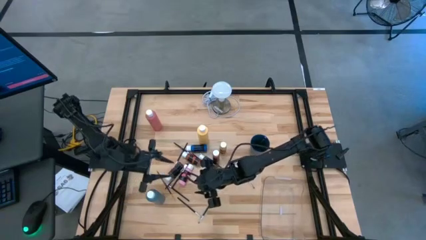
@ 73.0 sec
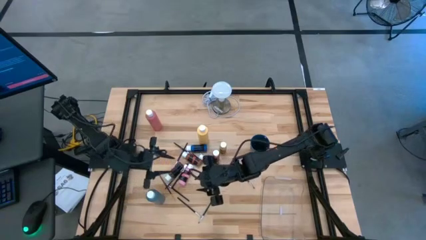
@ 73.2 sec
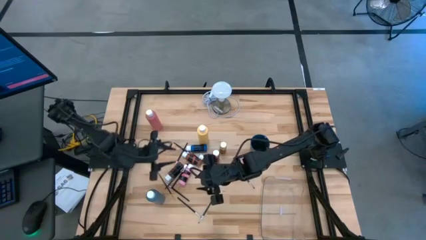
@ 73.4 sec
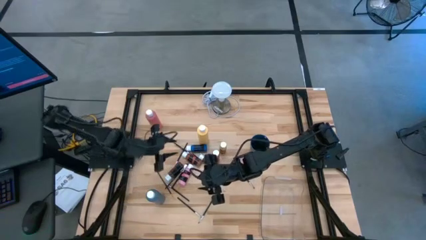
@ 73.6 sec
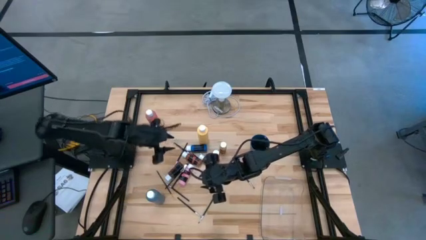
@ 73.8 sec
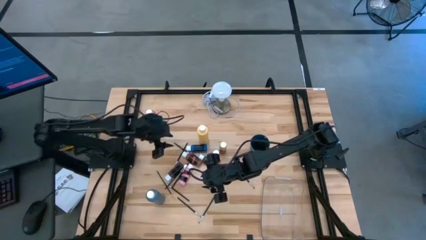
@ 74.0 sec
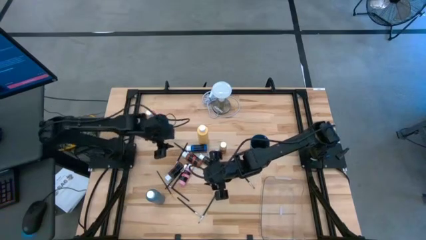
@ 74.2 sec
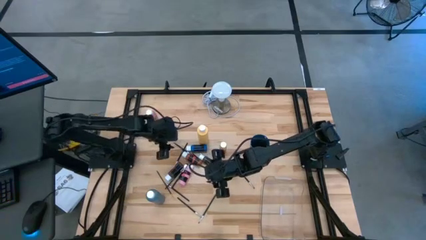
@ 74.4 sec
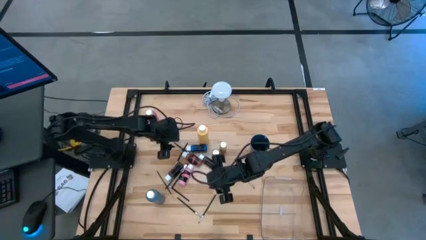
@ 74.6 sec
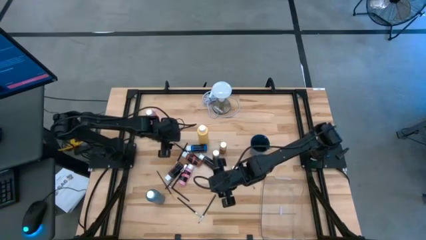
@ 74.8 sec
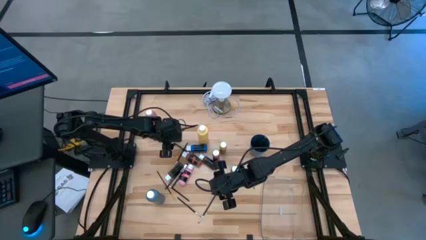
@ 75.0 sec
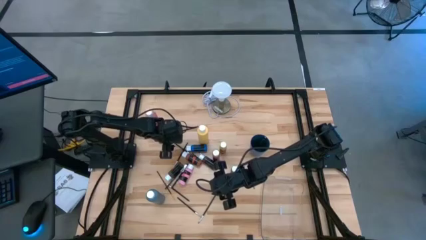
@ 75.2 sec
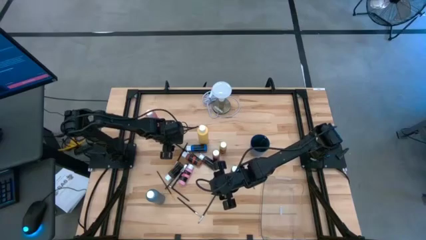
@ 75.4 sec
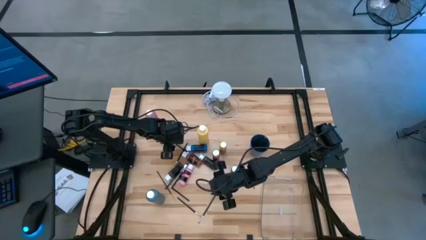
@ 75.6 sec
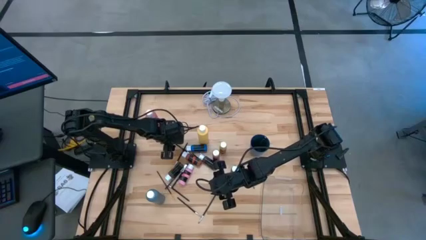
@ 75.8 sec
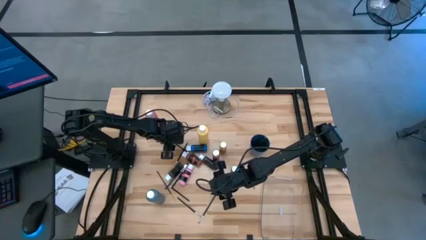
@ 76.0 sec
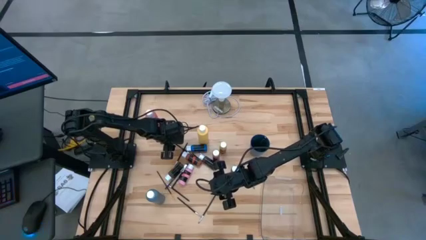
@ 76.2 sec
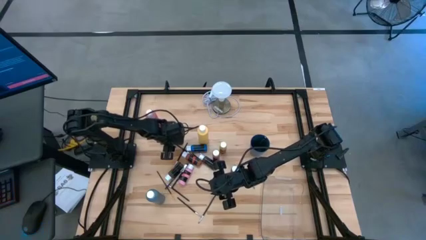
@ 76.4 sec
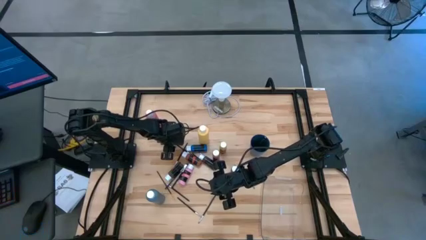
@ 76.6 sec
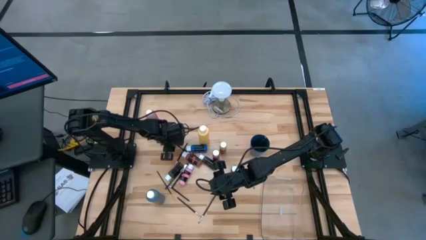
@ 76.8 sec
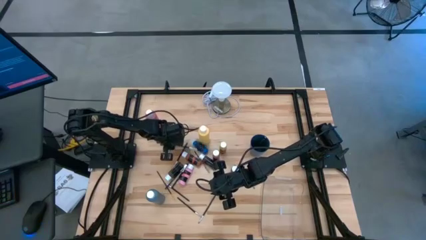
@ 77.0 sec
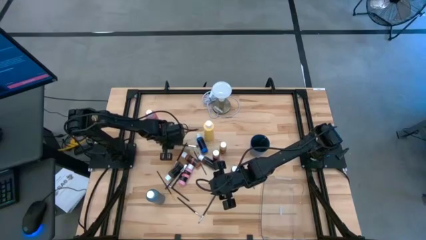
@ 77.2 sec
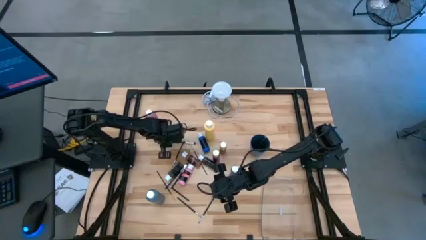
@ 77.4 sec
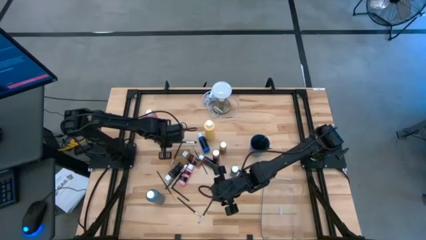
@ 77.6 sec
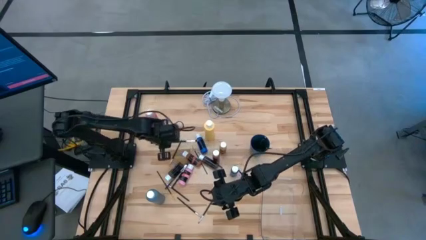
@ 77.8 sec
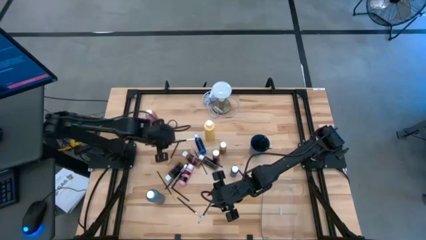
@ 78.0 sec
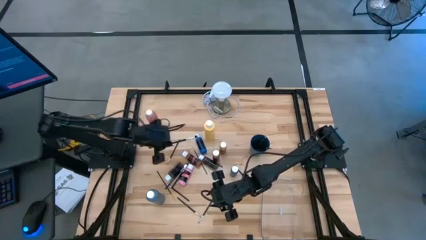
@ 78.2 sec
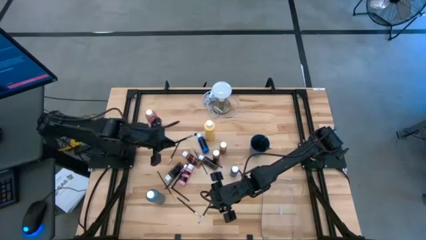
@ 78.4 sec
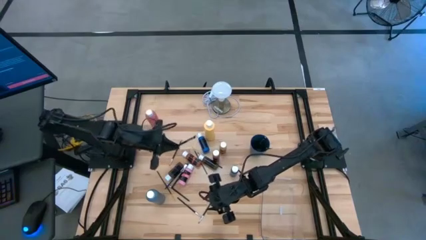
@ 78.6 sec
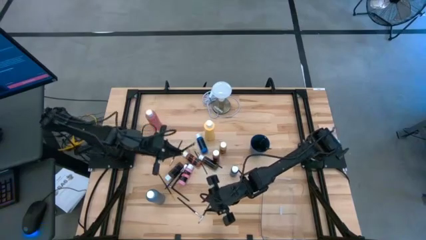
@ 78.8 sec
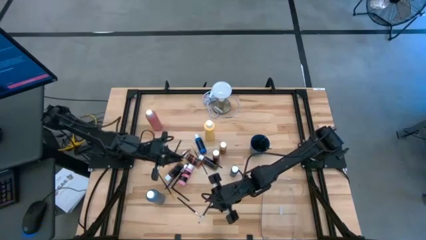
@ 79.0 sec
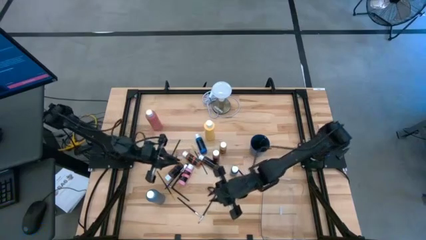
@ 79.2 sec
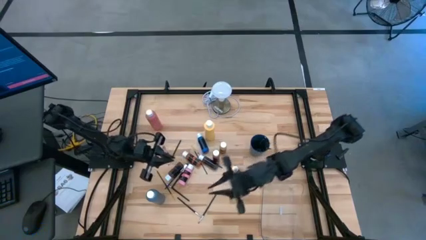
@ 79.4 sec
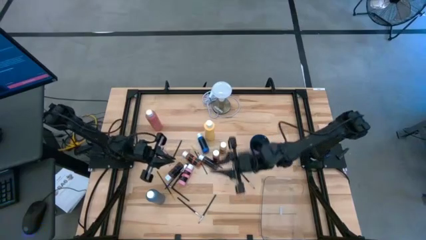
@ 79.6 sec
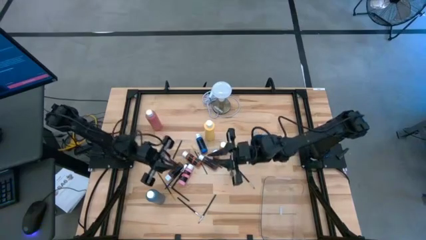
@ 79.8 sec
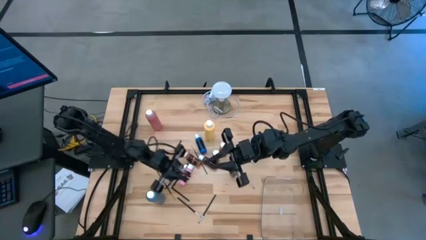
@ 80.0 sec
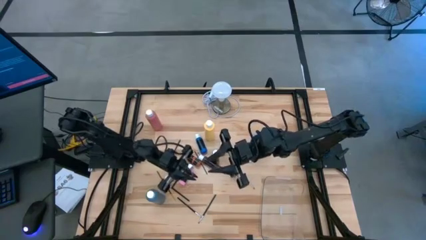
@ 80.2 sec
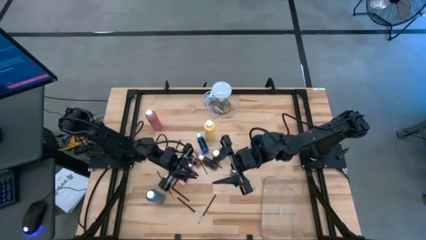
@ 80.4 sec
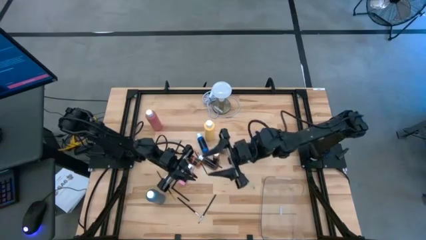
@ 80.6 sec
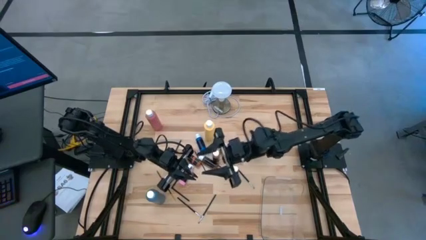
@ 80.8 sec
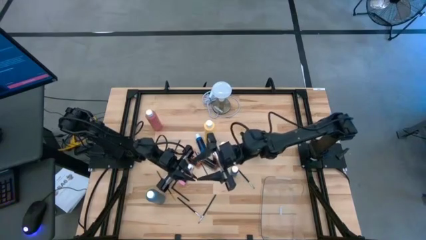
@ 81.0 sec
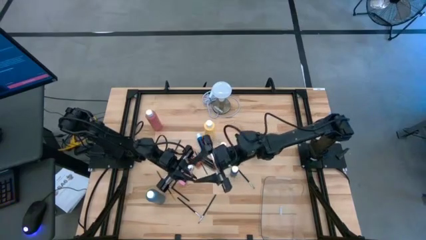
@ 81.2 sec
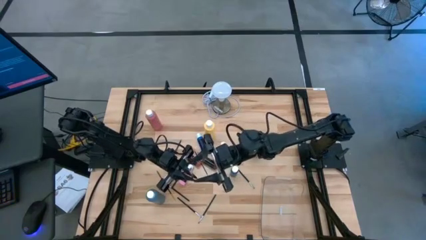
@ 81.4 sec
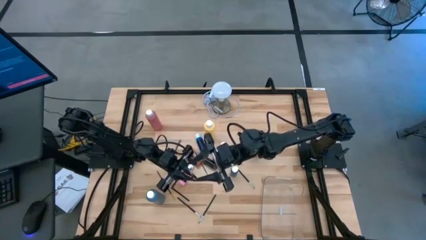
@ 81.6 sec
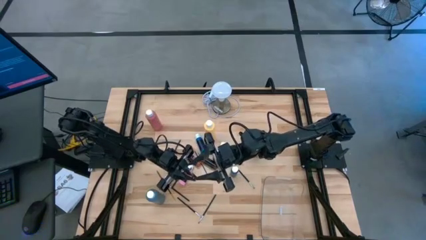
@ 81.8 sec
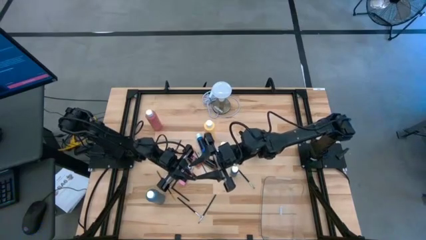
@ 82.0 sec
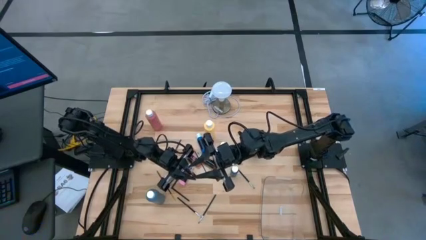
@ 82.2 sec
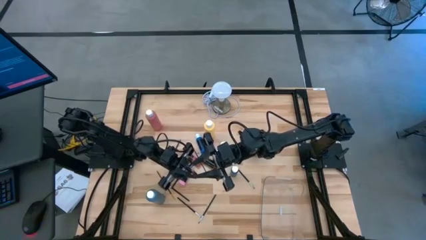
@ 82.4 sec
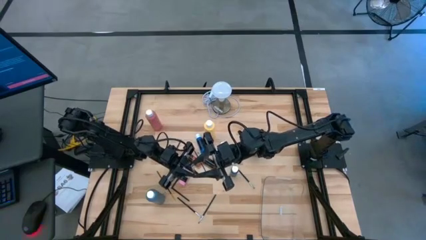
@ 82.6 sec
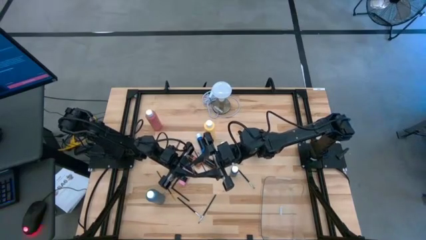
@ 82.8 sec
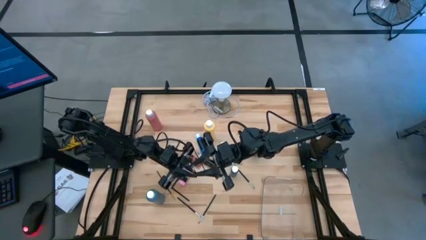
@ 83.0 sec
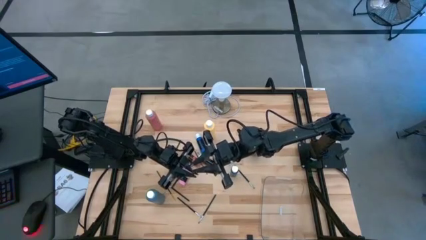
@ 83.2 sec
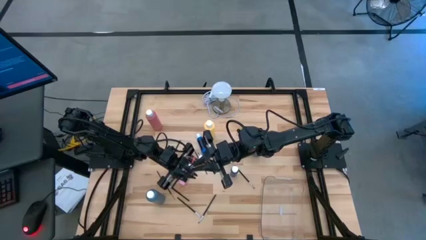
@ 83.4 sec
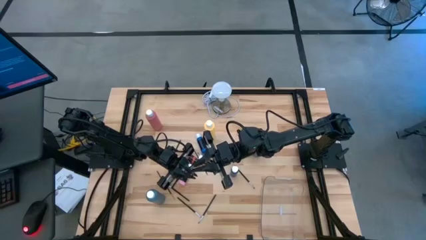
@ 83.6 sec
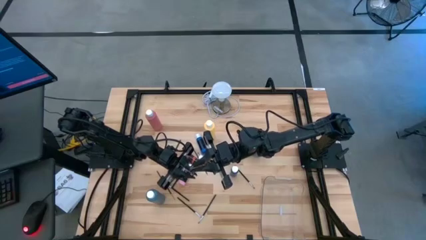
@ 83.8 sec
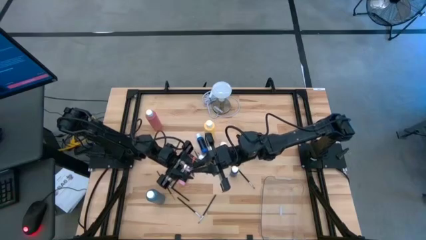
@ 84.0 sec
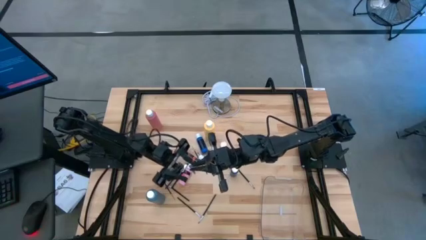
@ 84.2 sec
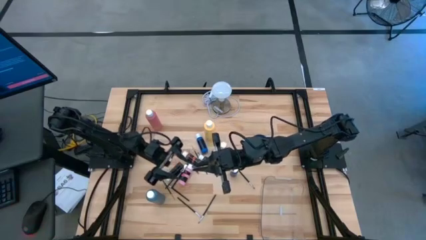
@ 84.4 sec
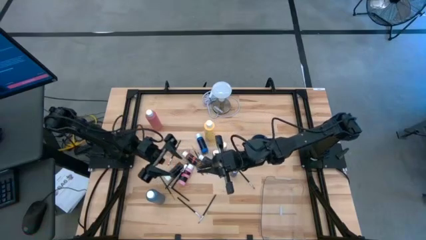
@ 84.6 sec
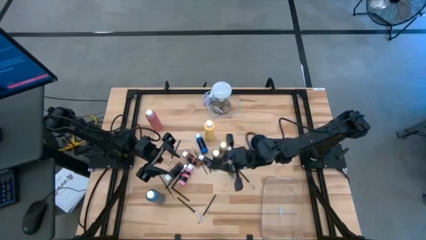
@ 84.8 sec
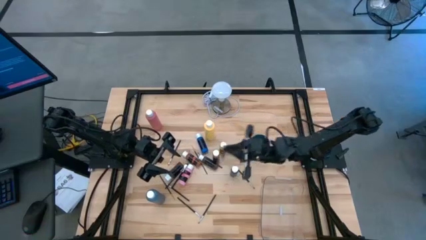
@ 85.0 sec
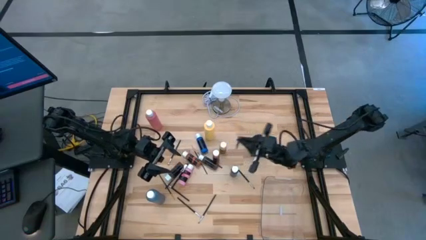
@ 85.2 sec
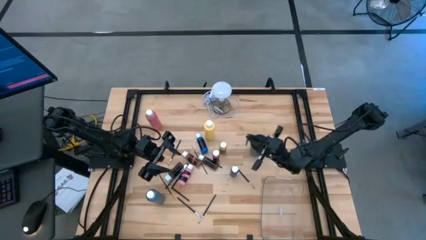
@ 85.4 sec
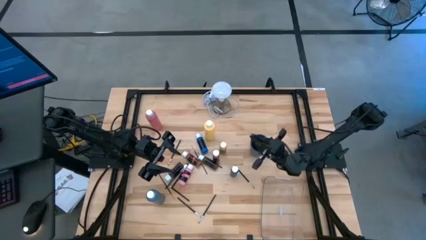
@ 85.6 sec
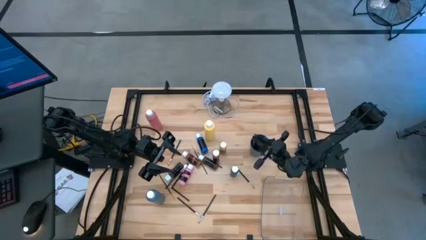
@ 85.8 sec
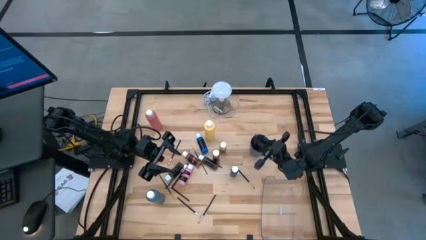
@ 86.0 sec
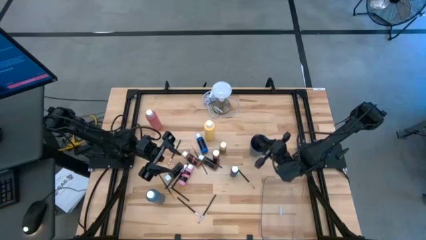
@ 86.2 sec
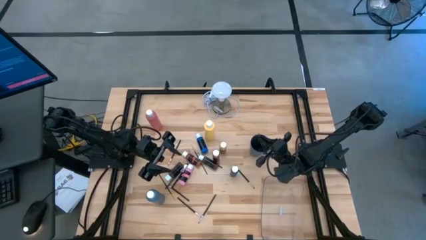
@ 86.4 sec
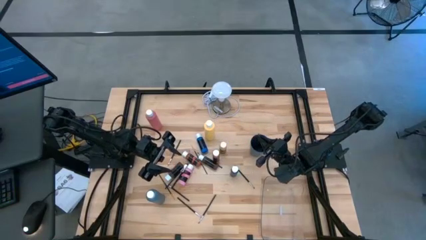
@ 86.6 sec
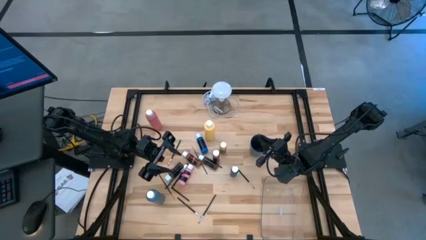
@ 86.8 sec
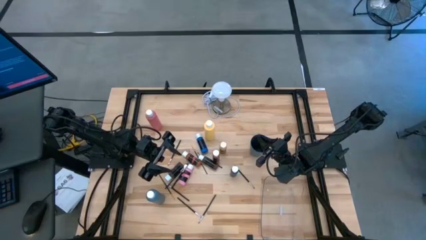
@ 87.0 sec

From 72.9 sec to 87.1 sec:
Task: Pick & Place Paint Supplies
Put the black silver paintbrush into the blue cup
